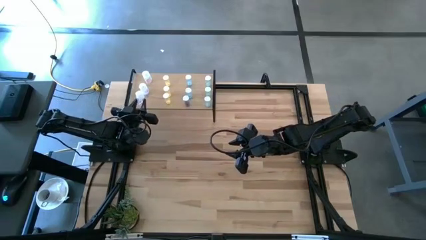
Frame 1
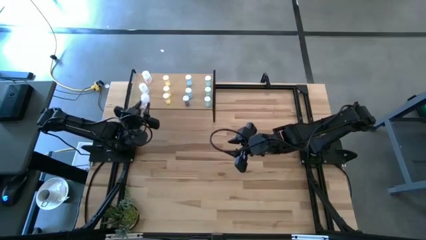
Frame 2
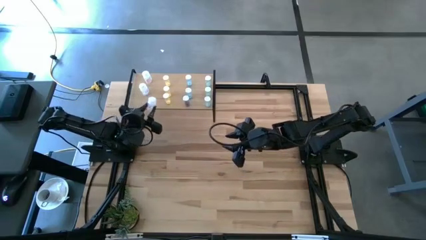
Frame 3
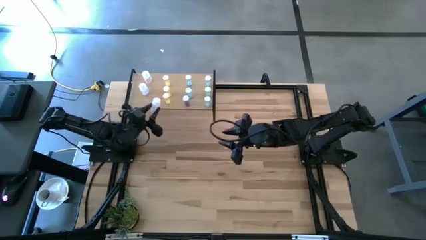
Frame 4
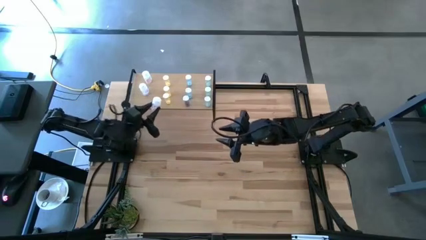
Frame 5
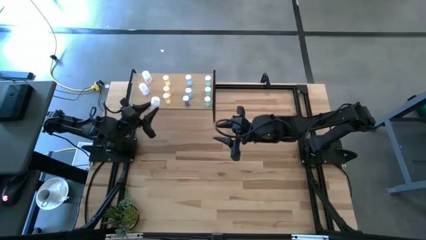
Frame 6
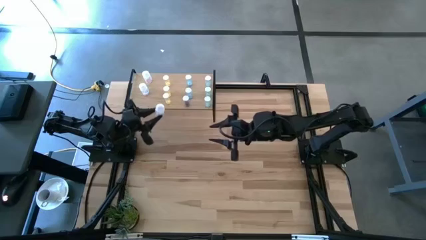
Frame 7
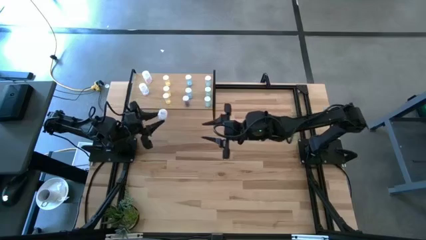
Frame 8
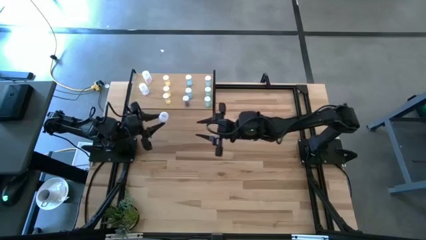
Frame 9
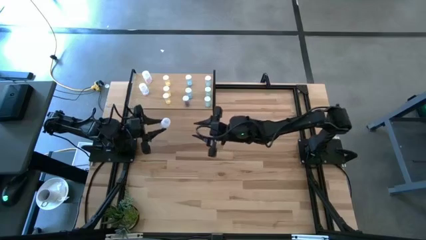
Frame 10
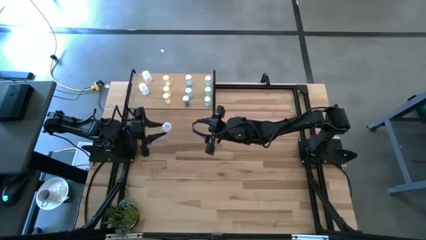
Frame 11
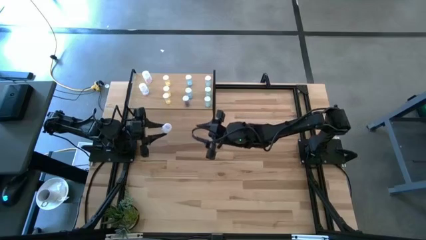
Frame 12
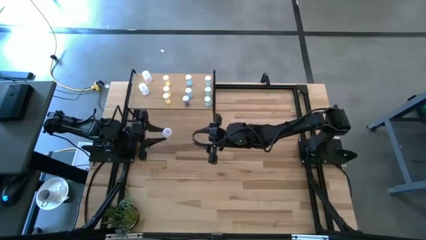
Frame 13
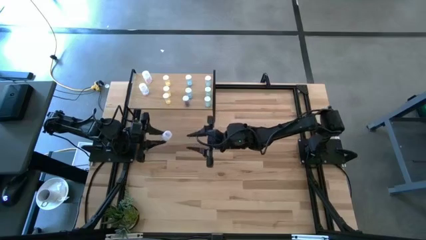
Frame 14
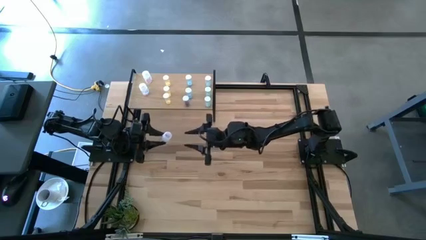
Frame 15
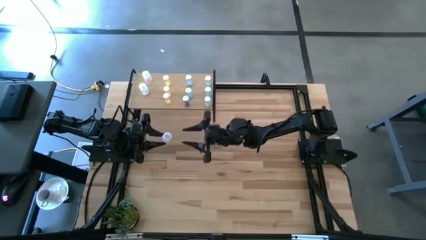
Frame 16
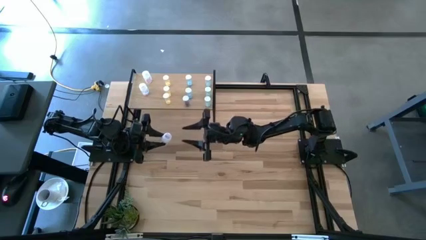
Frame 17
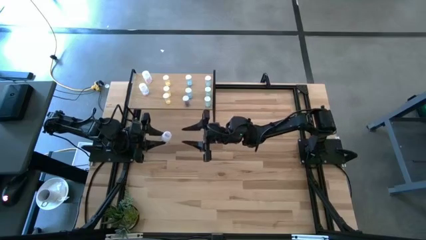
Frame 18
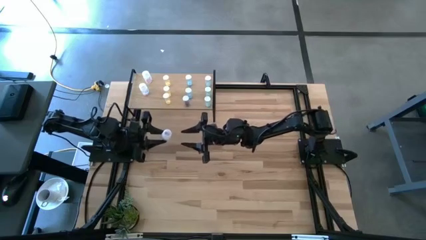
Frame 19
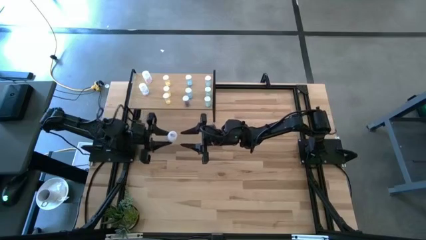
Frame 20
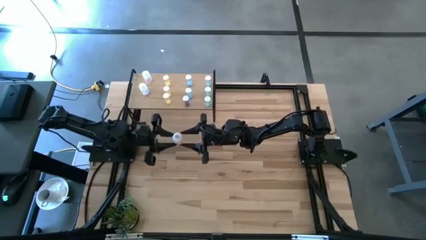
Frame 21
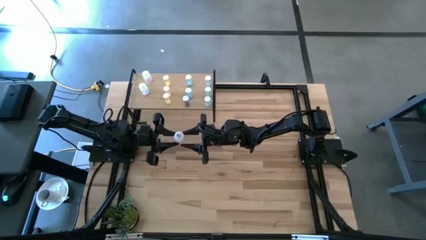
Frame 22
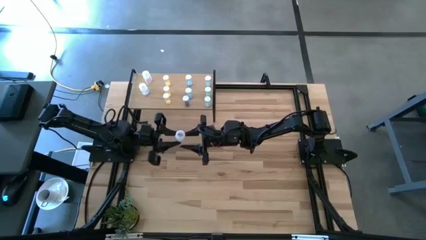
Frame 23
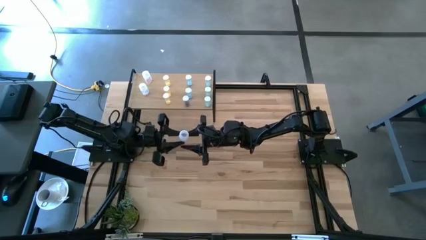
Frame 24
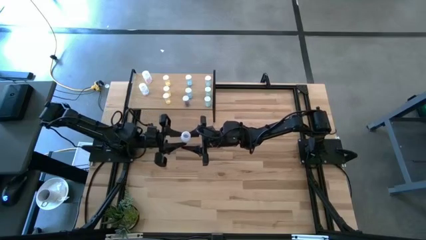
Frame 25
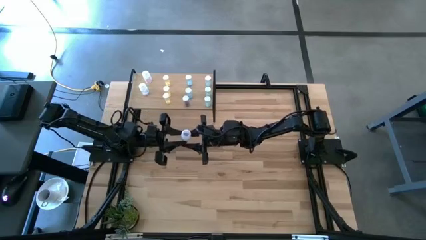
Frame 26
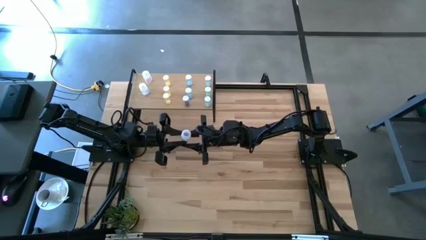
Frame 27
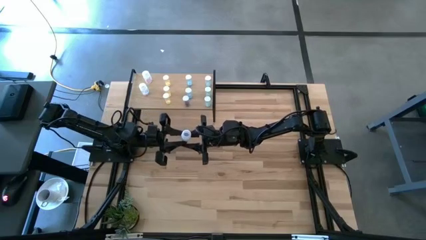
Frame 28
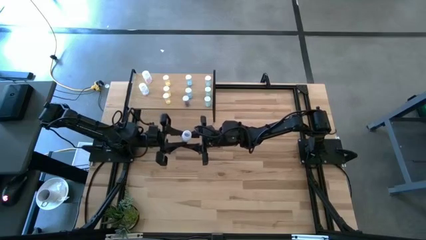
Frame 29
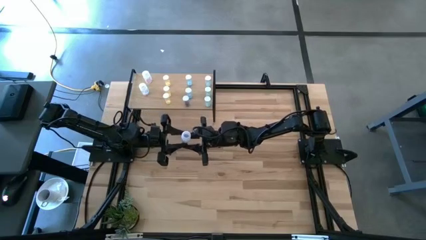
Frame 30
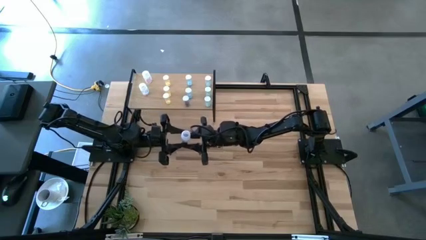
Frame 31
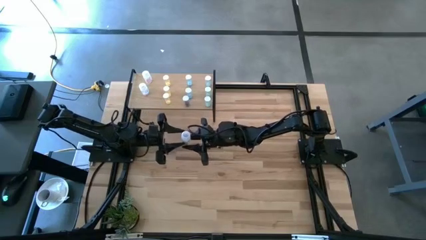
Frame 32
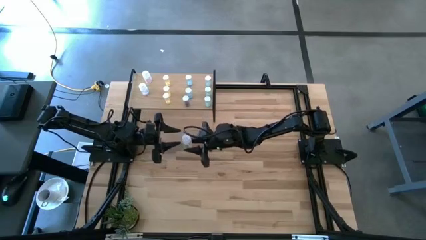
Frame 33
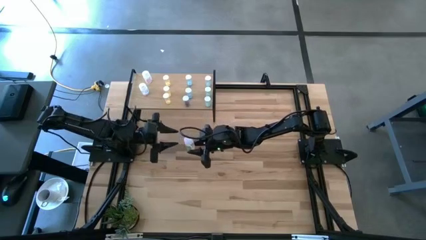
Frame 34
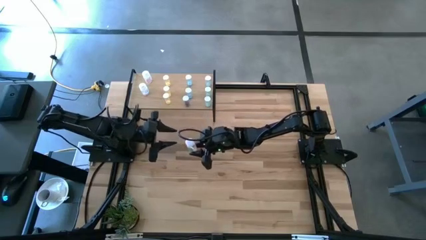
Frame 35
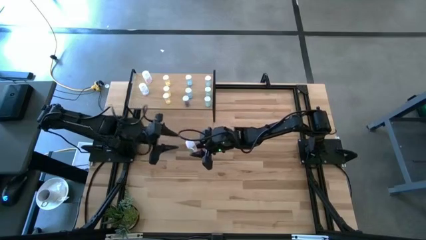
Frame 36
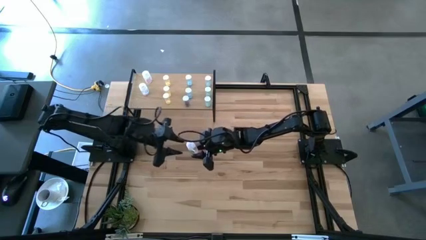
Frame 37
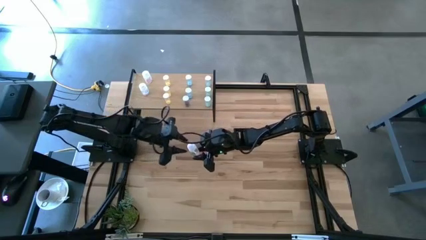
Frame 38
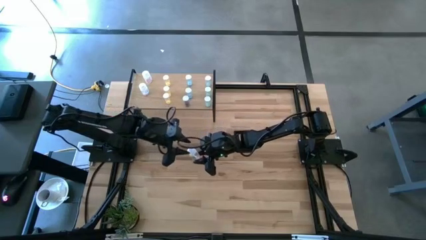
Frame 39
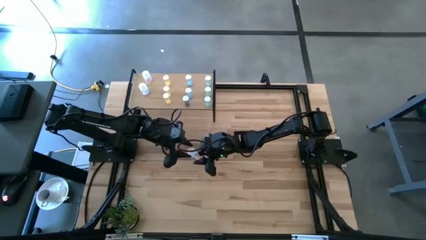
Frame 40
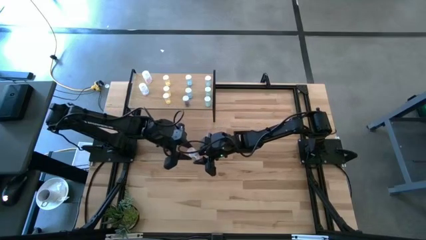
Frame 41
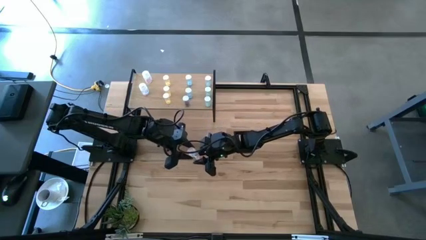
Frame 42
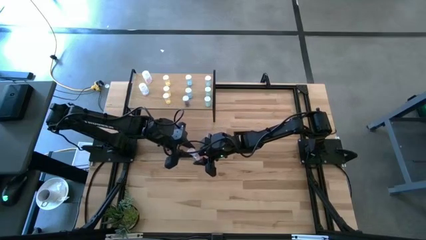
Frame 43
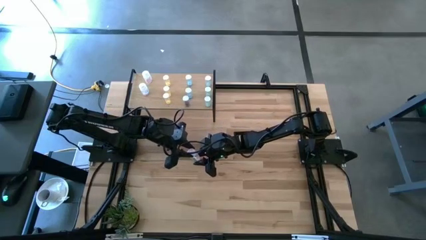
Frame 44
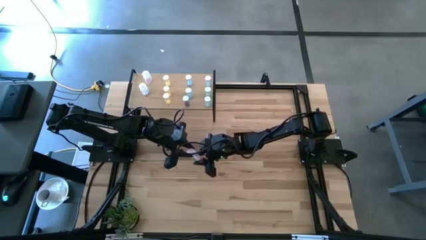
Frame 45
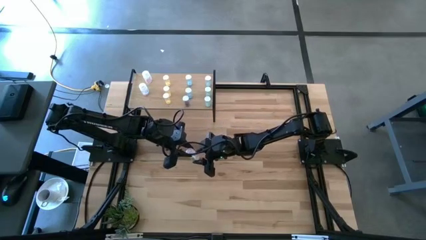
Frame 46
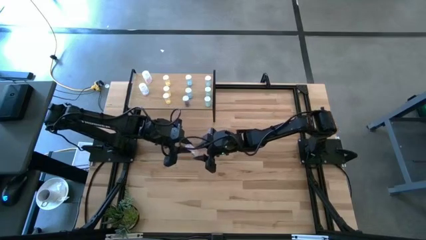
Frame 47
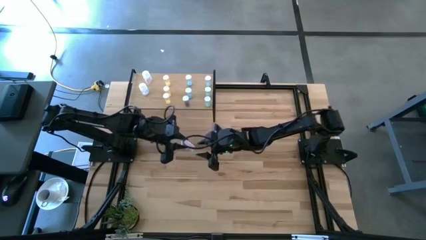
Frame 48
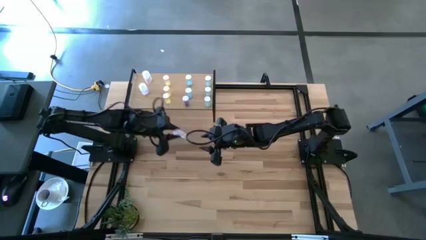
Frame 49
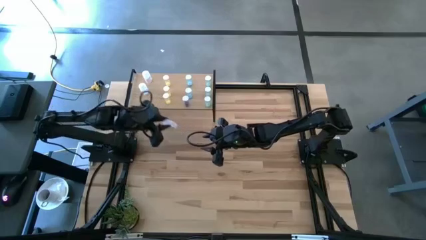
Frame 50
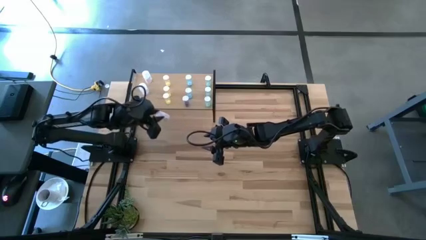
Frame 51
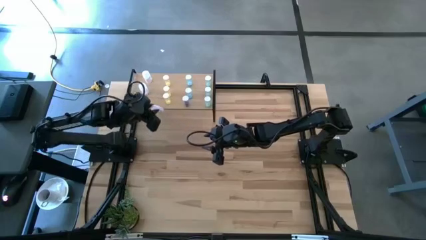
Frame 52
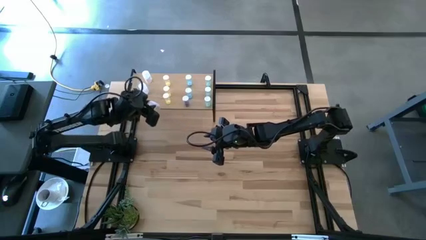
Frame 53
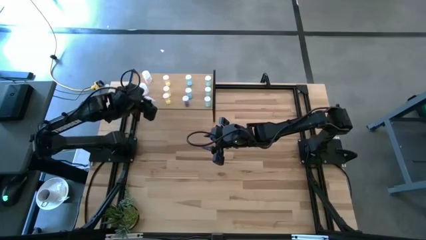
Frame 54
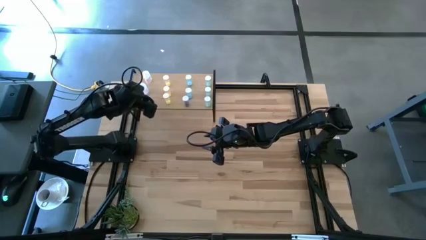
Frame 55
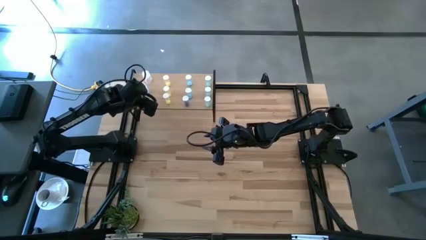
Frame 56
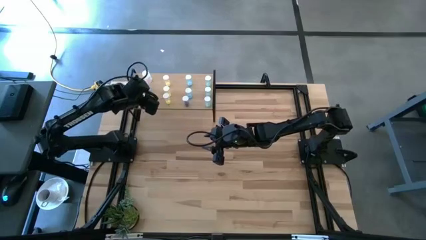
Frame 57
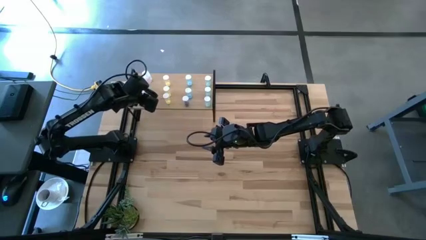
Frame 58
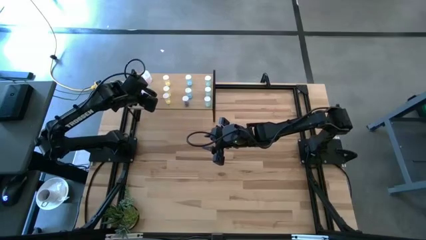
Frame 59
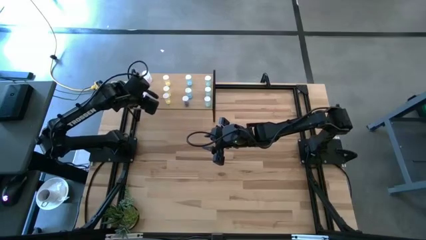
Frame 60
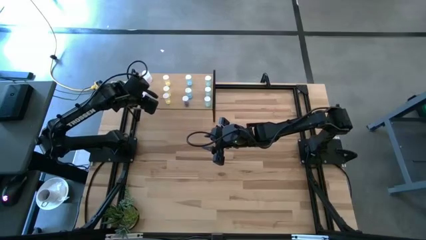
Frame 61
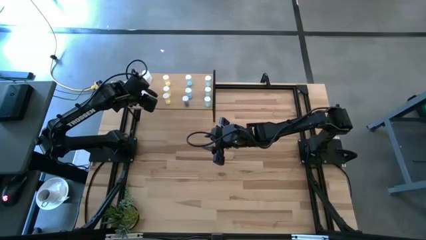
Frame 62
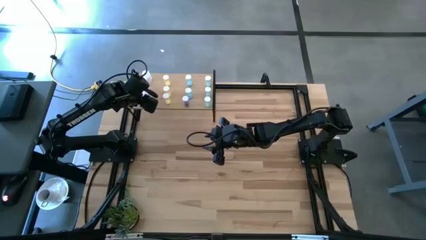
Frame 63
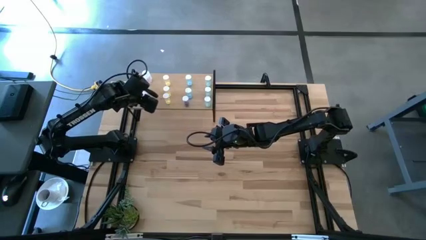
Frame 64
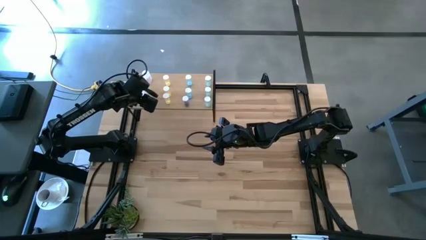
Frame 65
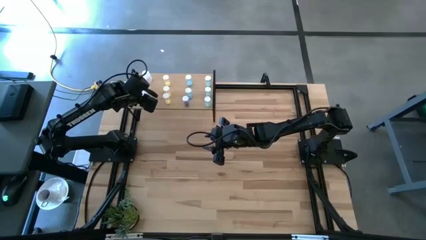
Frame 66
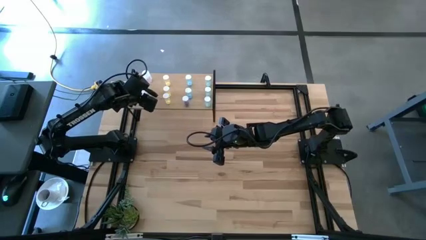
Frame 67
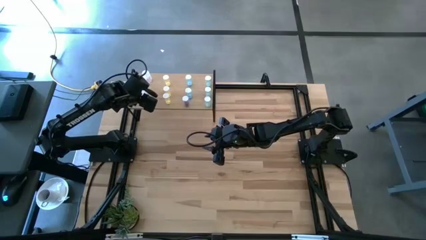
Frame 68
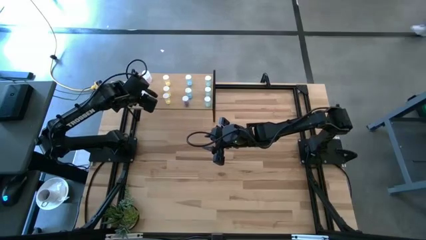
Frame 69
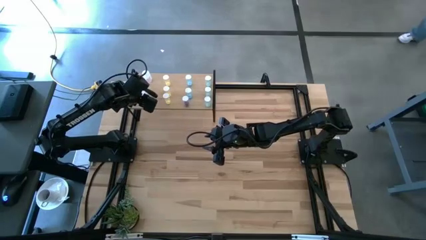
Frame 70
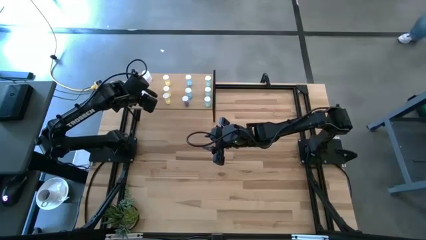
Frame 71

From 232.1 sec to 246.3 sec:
Task: Pick and place medicine bottles onto shelf by color
Put the white pill bottle on the shelf aligned with the other white pill bottles
